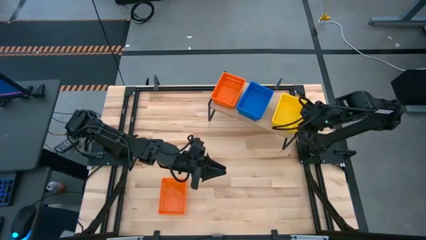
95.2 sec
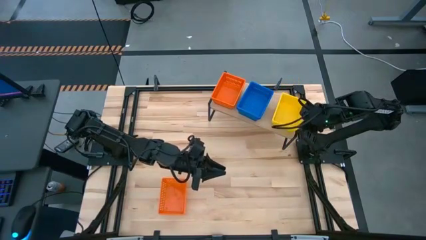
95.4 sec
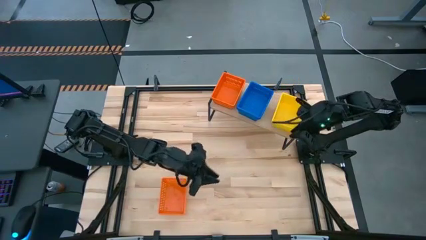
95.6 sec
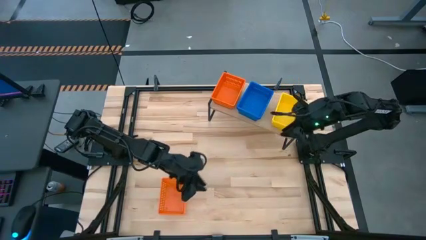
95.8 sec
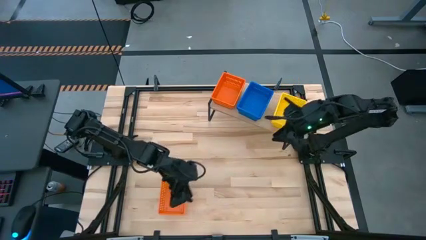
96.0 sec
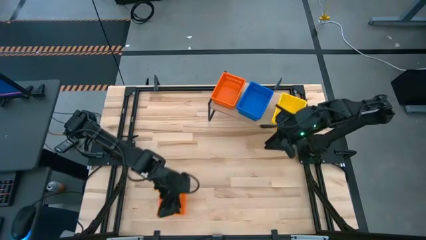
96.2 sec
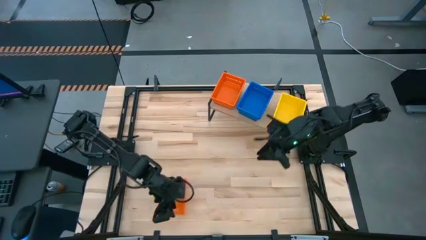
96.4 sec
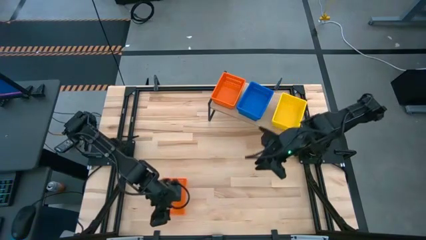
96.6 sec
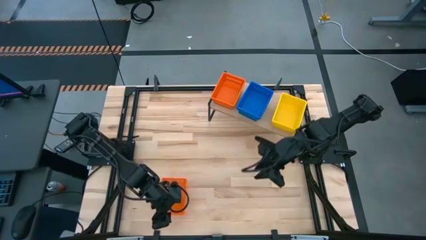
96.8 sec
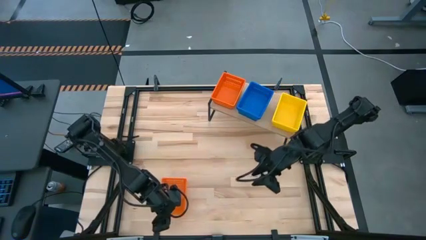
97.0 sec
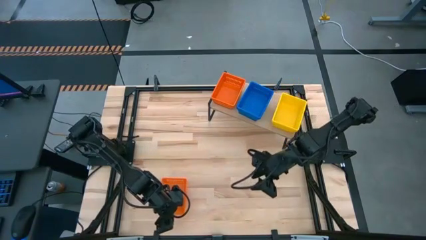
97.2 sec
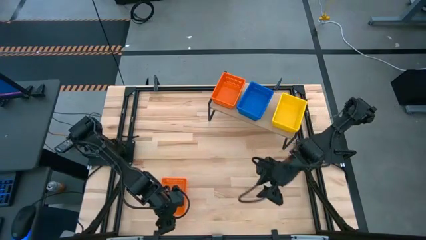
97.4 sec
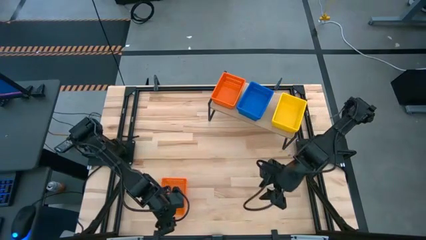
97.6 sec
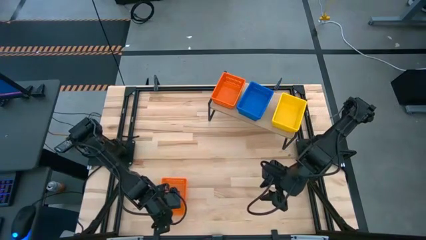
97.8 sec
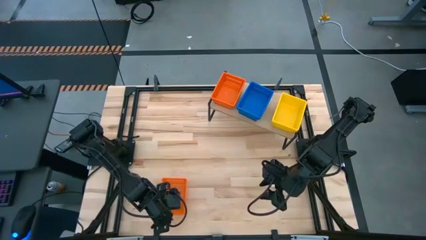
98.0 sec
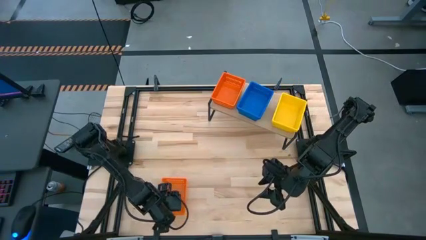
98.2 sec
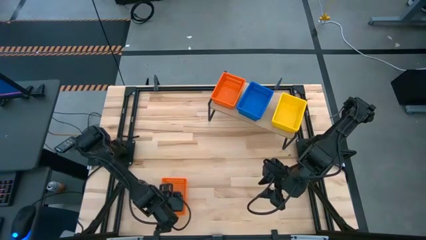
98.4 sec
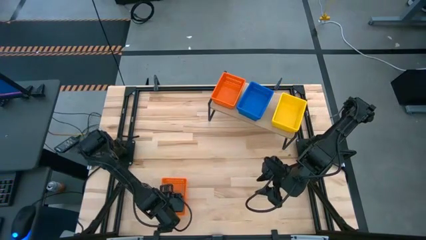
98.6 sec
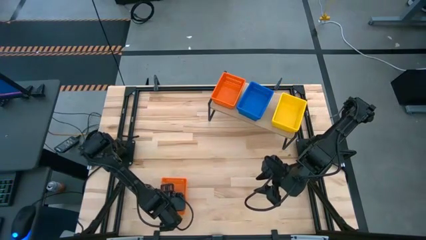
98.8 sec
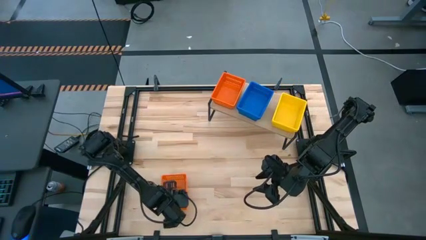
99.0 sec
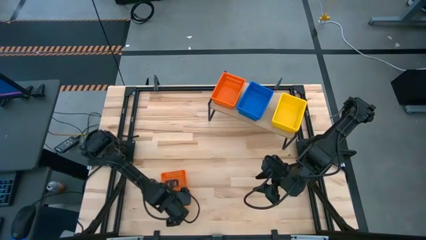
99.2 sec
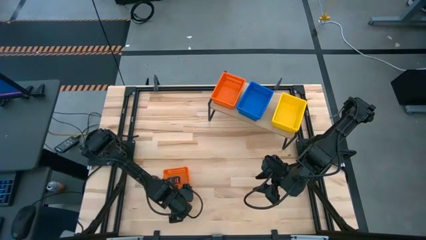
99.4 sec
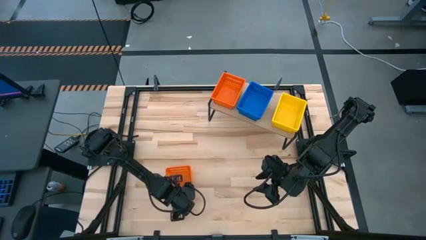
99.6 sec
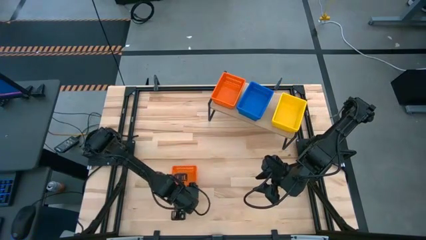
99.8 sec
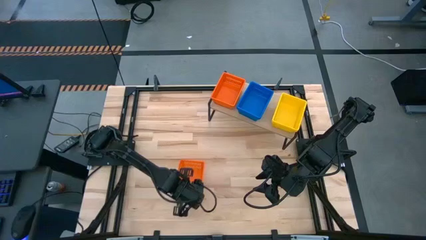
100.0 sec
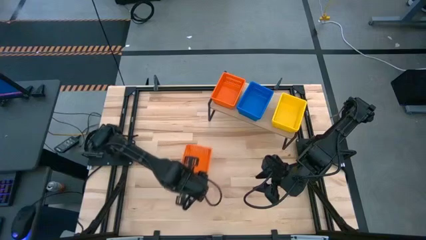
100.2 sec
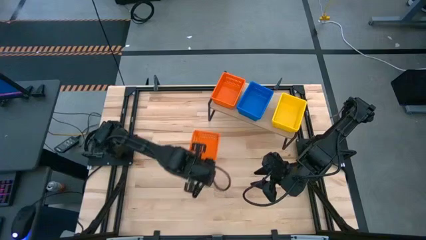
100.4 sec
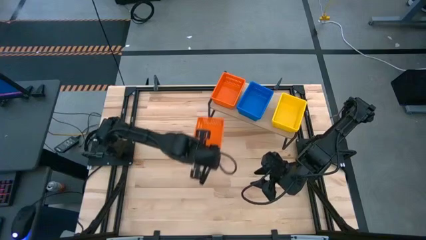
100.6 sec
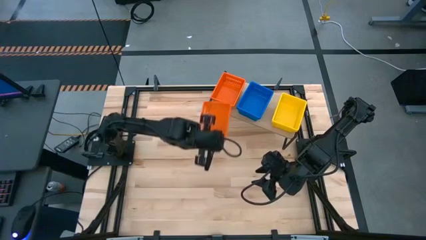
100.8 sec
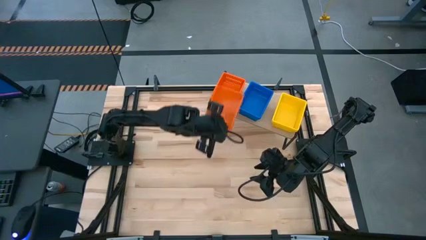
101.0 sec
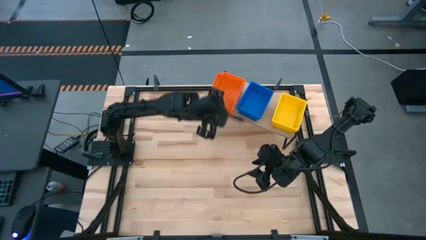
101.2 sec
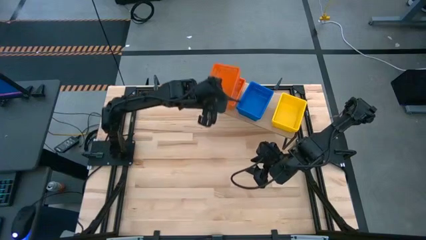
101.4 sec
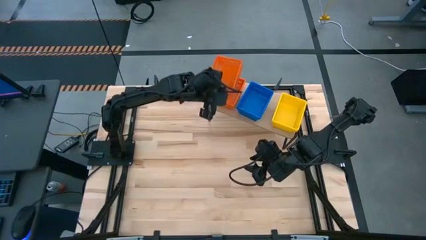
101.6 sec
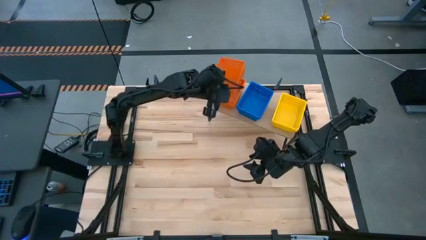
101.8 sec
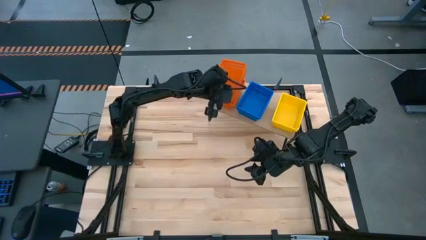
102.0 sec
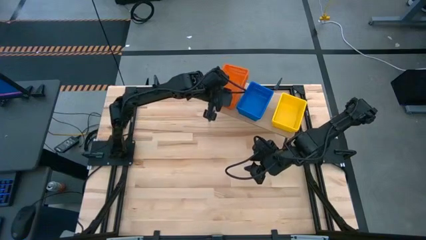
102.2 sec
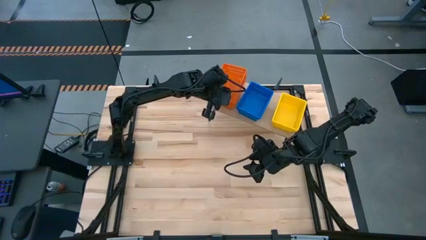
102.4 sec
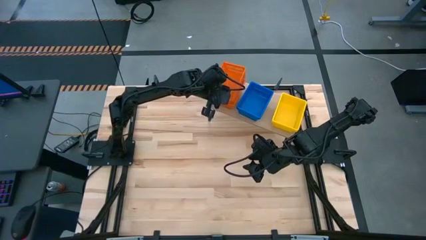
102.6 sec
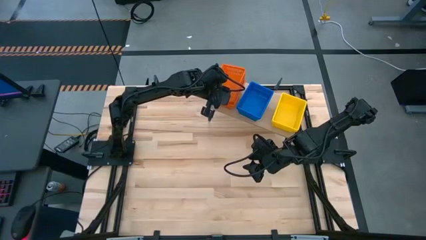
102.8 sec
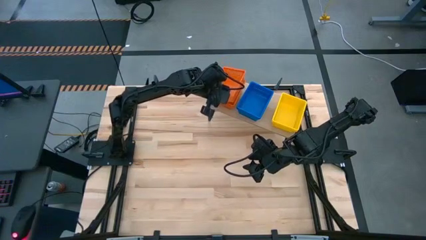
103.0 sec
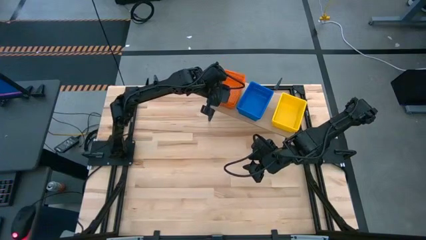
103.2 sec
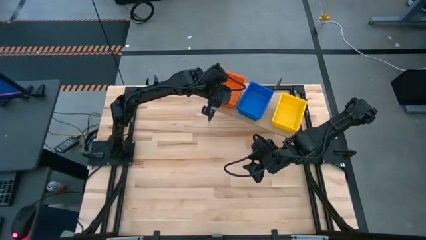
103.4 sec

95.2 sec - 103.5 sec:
Task: Stack baskets on shelf by color
Stack the orange basket on the orange basket on the shelf

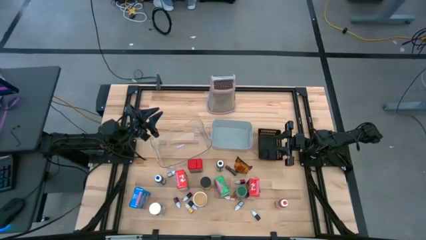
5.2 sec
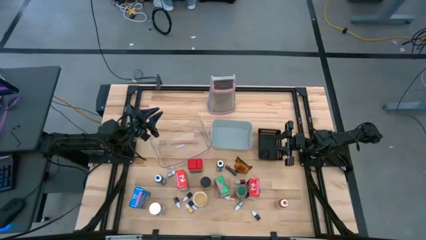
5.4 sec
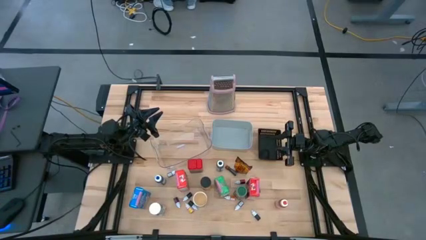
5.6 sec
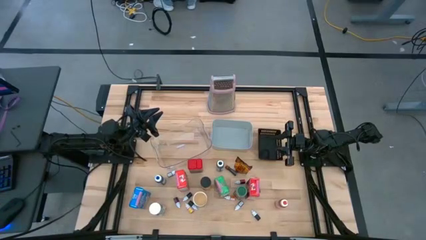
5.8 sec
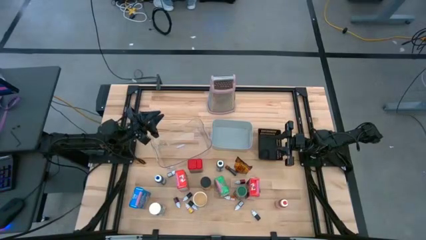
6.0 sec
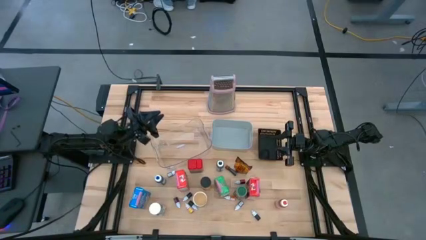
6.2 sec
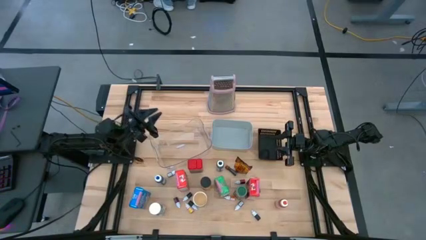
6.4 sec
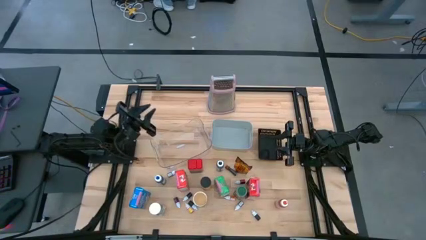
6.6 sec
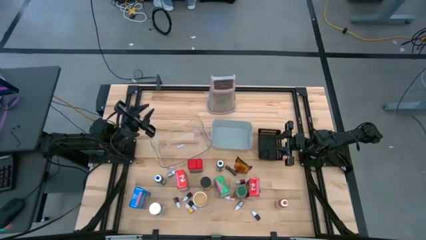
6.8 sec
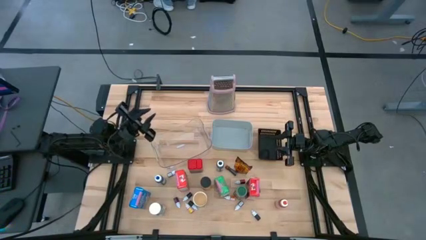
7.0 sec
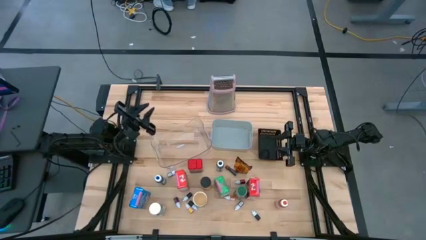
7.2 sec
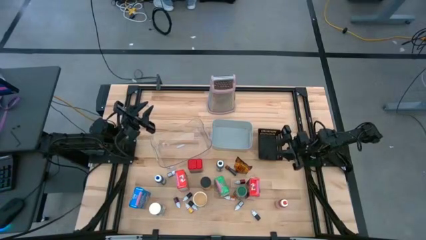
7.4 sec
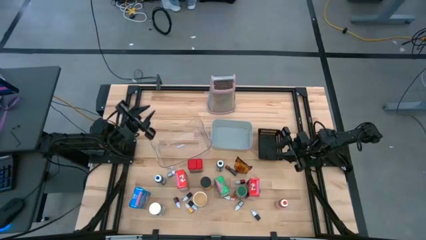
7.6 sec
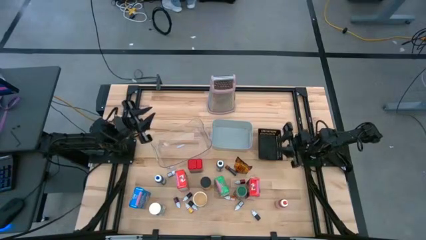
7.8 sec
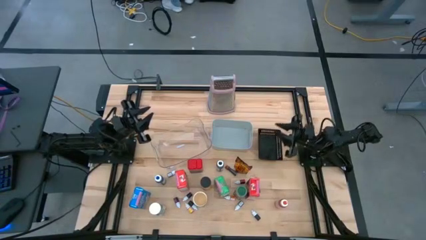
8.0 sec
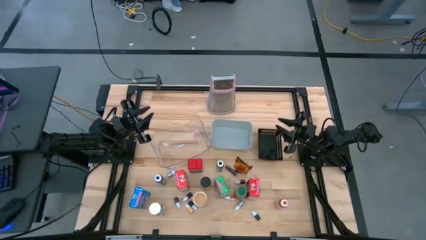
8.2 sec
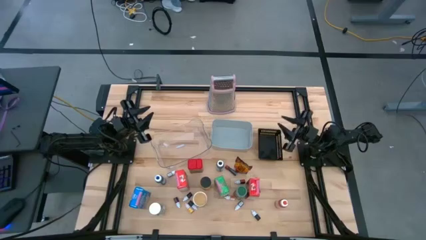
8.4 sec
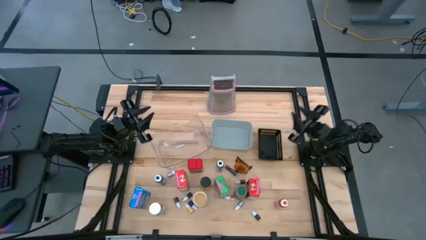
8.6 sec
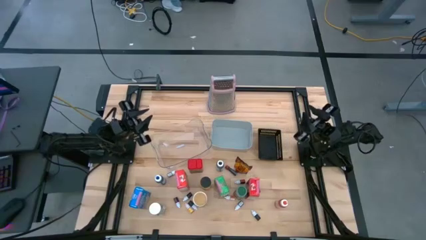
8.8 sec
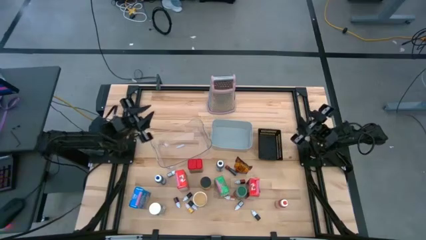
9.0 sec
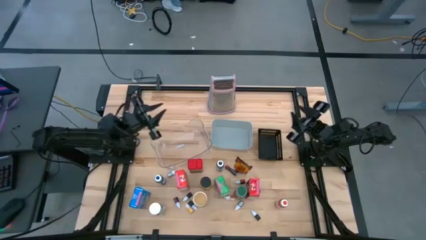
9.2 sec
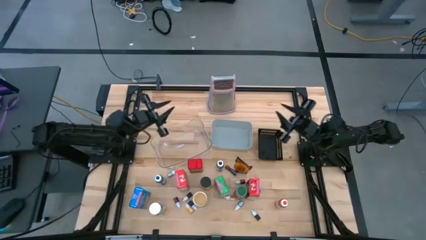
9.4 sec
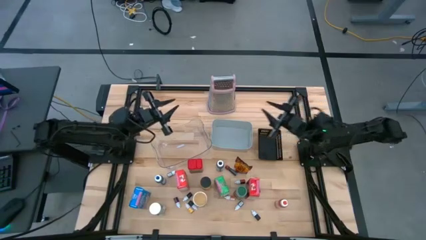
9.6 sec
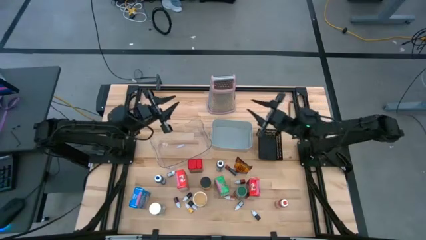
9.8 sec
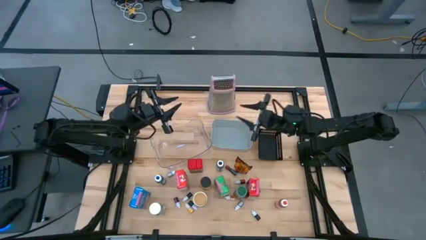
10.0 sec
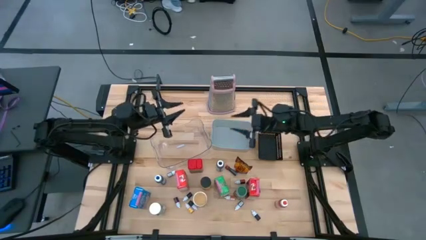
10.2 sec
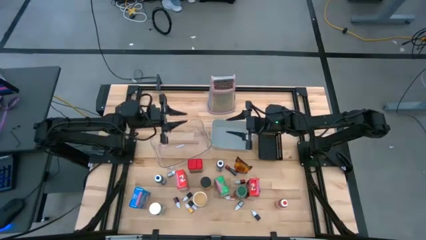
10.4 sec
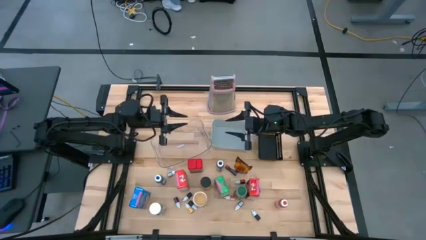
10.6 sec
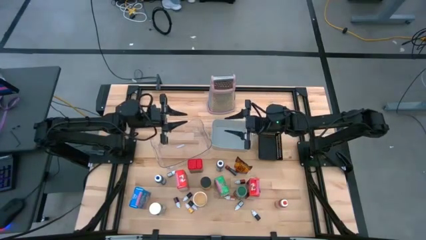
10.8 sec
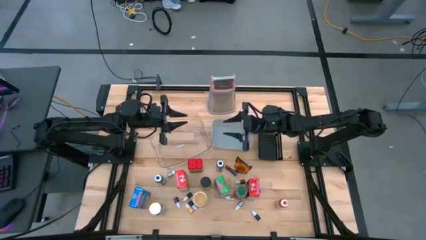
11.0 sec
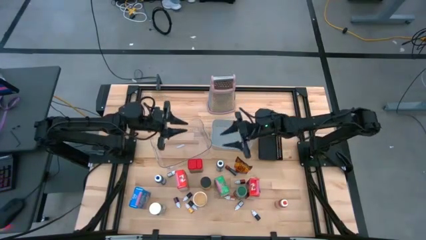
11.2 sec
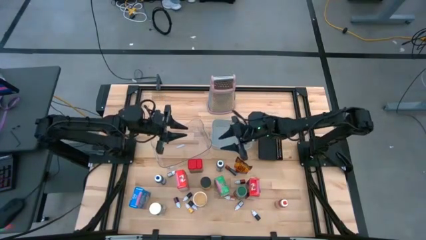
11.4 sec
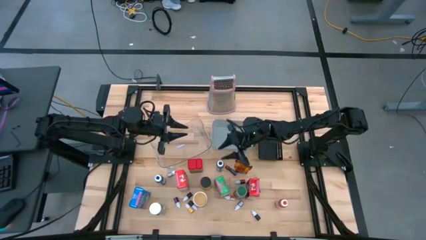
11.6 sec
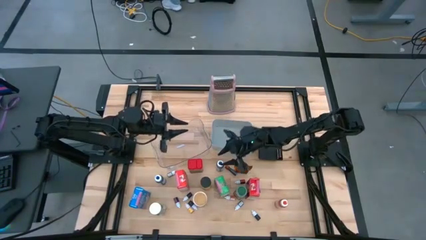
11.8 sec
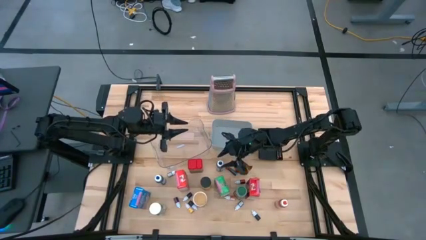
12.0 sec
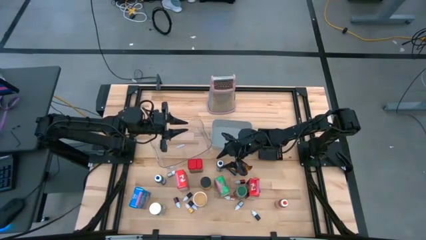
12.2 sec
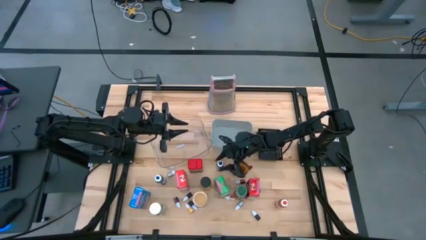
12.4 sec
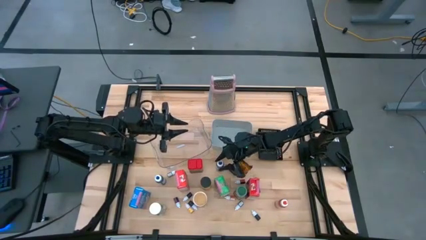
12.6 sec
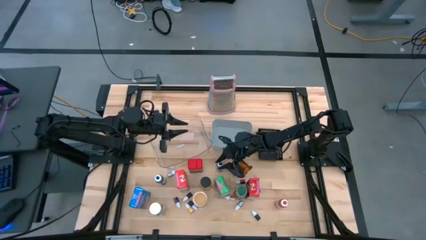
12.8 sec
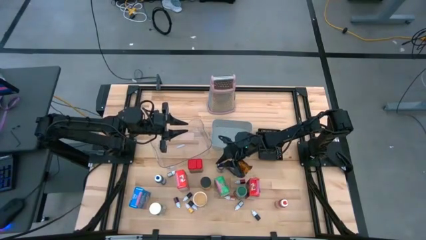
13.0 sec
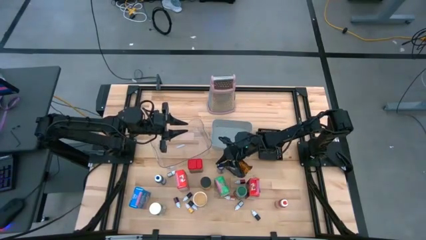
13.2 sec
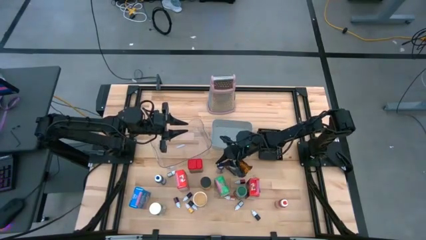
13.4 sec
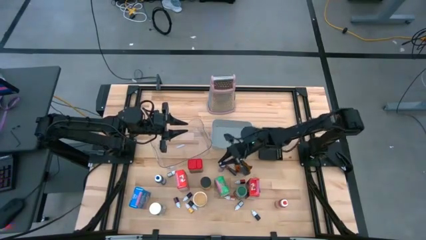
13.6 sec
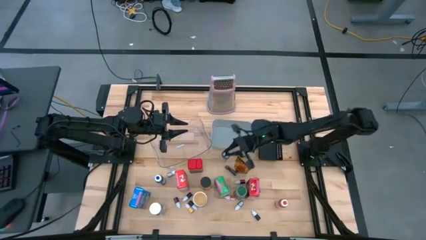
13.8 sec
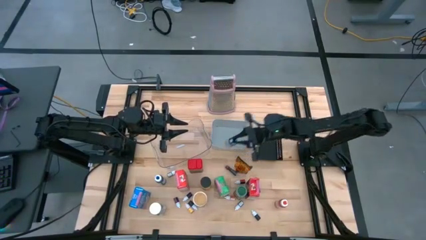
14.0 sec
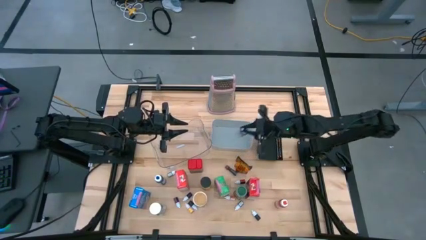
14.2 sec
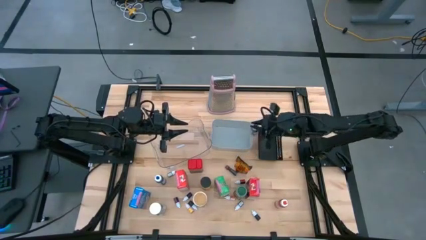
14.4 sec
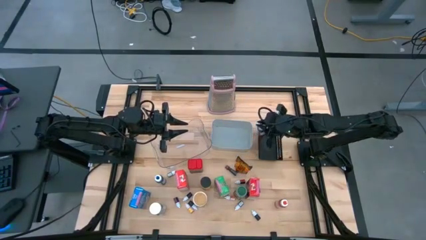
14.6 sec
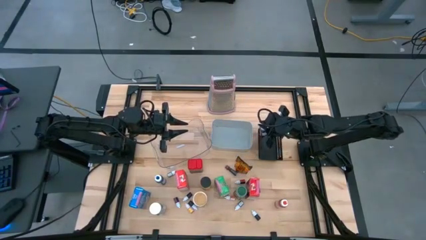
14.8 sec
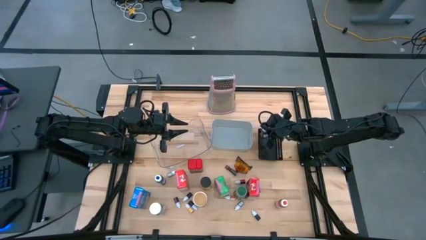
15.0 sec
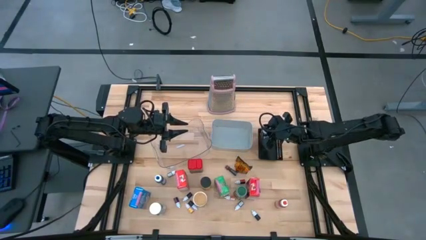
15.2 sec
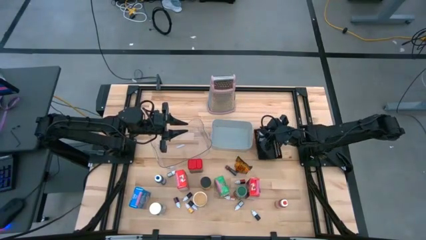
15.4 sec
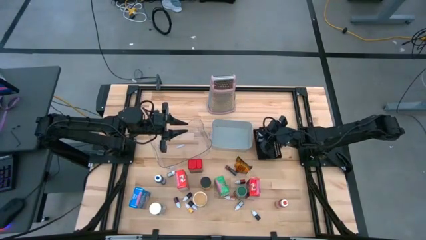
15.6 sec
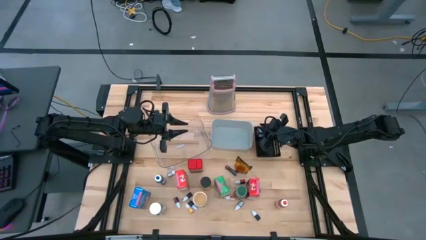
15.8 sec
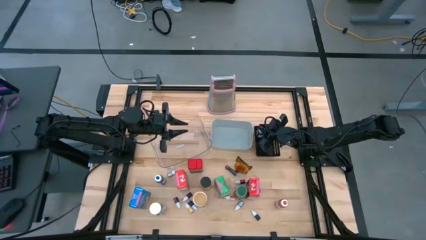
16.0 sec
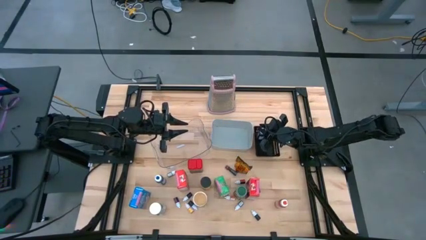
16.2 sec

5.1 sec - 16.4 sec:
Task: Pick & Place Kitchen Items
Put the large black food coloring bottle into the black basket
